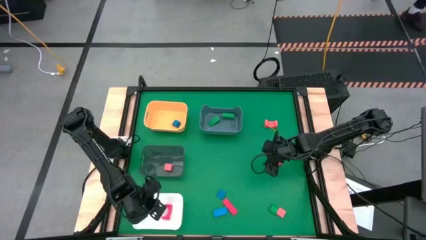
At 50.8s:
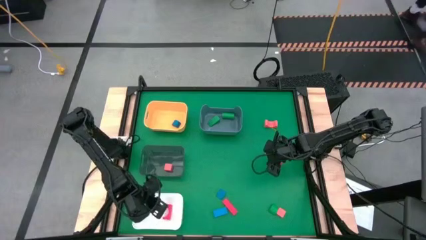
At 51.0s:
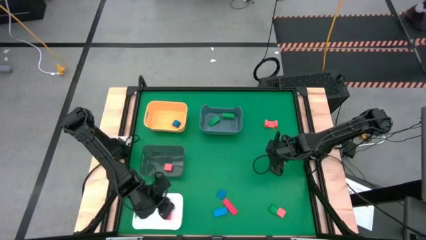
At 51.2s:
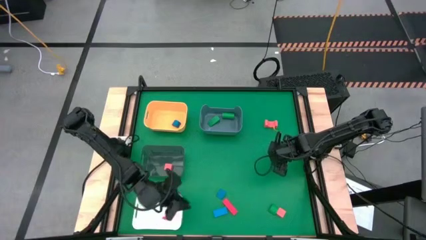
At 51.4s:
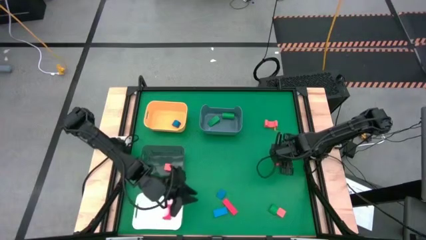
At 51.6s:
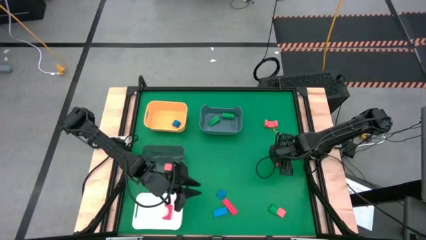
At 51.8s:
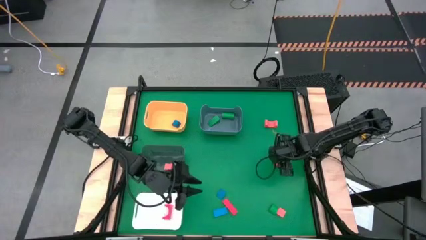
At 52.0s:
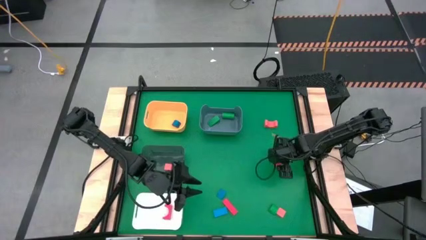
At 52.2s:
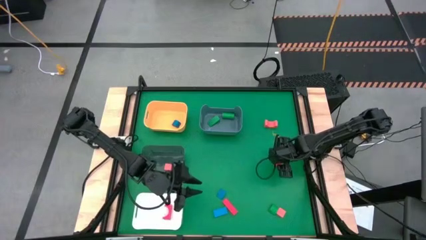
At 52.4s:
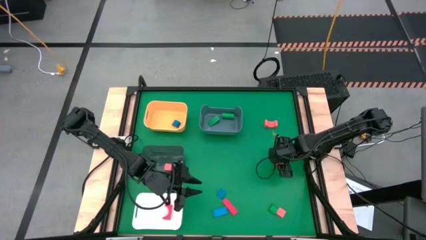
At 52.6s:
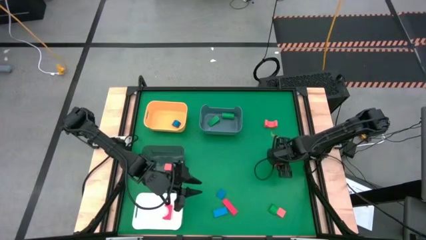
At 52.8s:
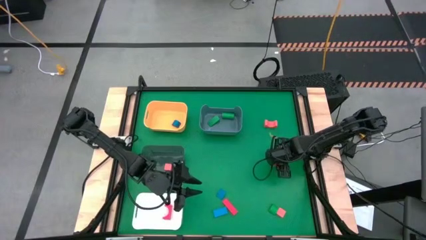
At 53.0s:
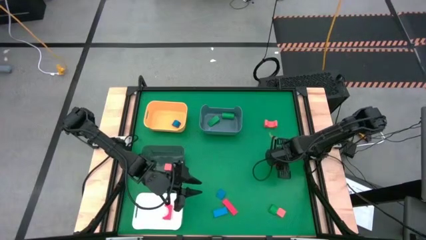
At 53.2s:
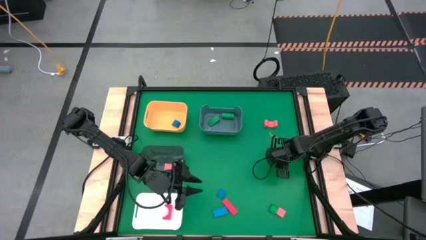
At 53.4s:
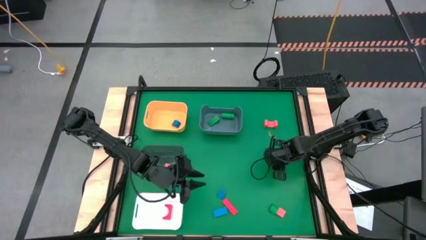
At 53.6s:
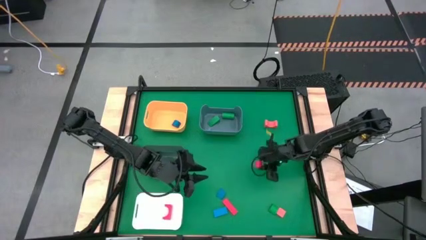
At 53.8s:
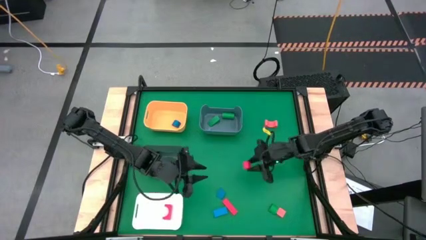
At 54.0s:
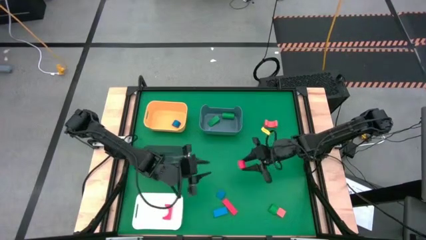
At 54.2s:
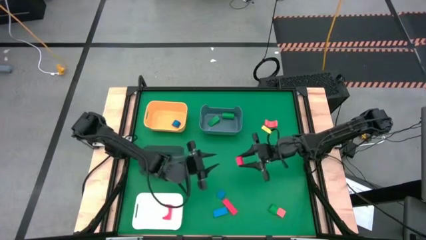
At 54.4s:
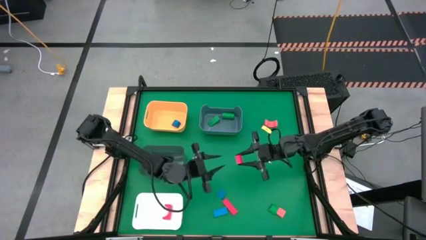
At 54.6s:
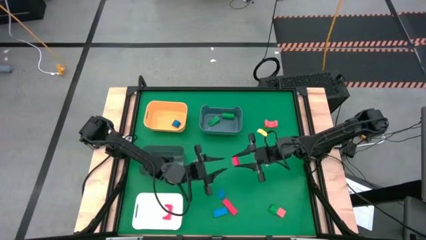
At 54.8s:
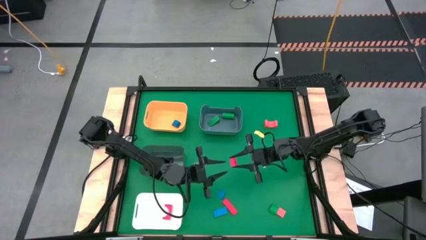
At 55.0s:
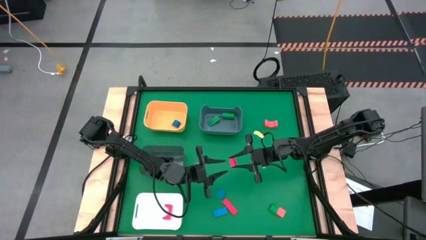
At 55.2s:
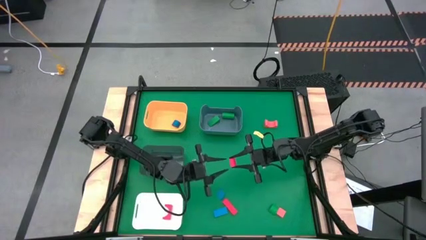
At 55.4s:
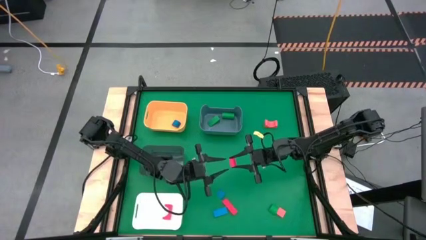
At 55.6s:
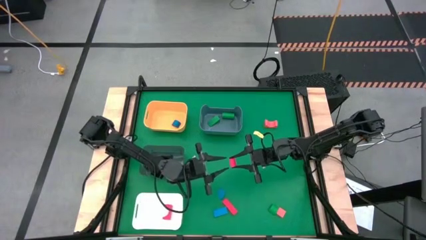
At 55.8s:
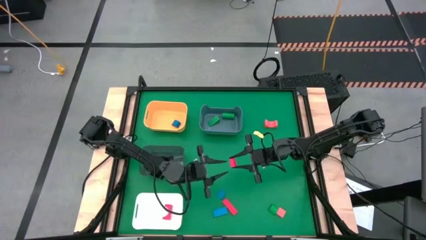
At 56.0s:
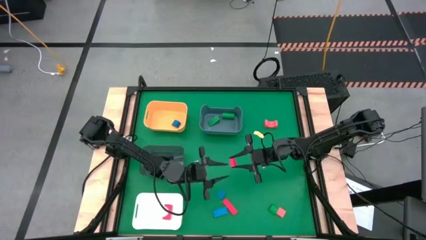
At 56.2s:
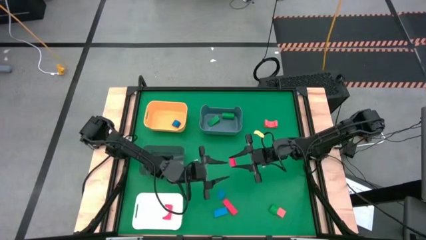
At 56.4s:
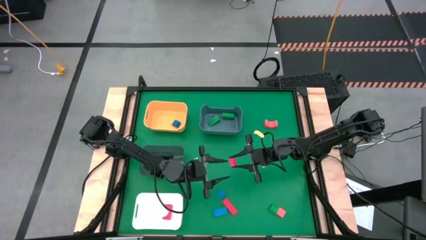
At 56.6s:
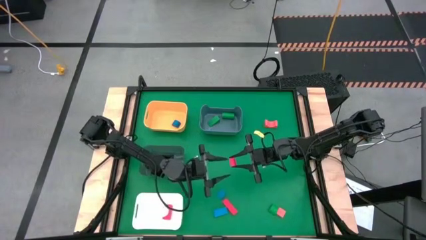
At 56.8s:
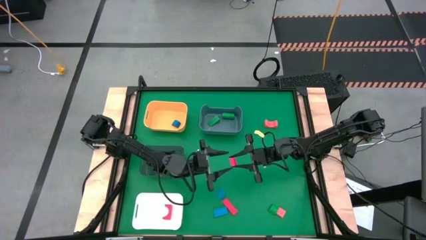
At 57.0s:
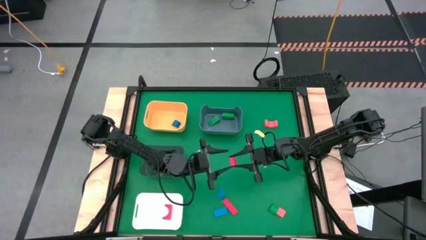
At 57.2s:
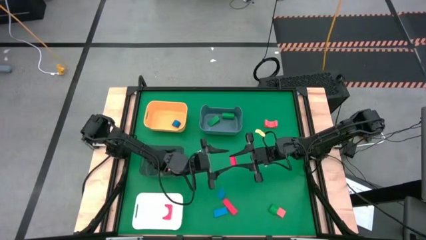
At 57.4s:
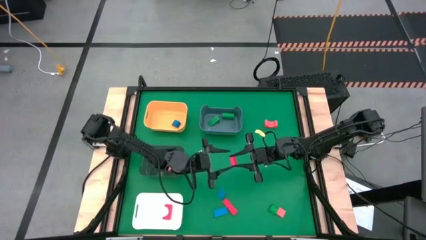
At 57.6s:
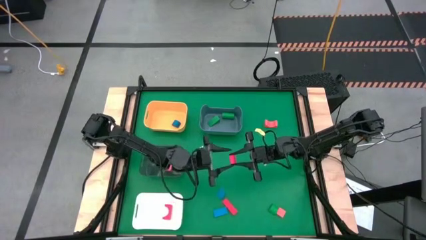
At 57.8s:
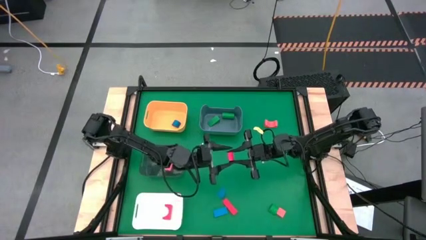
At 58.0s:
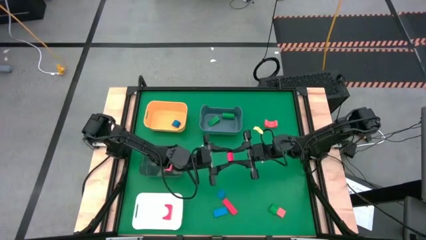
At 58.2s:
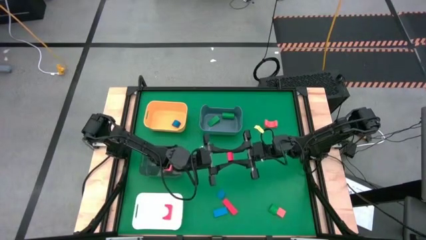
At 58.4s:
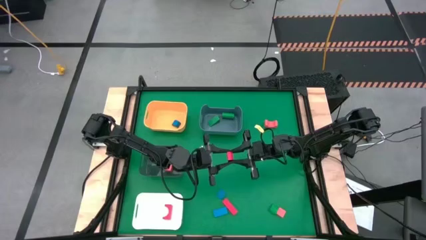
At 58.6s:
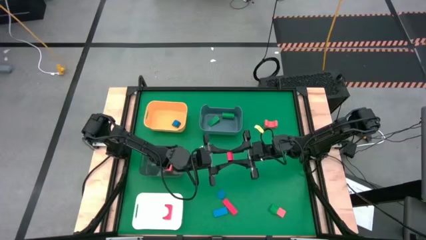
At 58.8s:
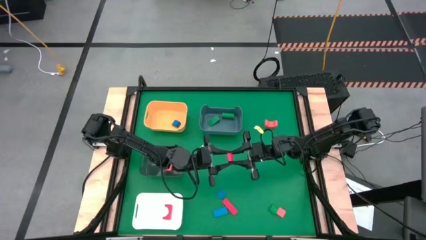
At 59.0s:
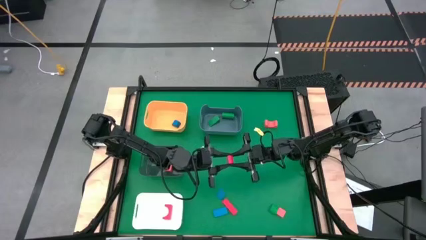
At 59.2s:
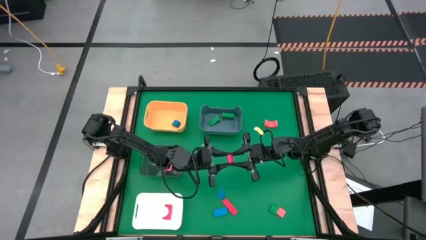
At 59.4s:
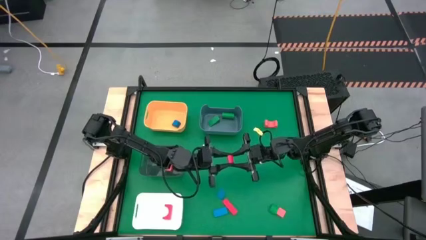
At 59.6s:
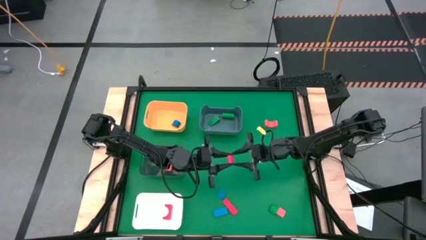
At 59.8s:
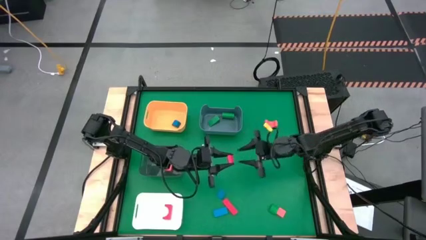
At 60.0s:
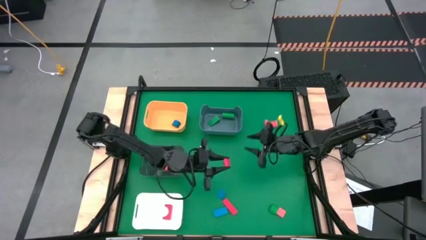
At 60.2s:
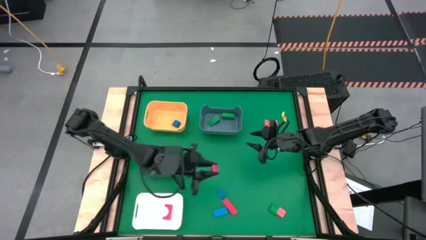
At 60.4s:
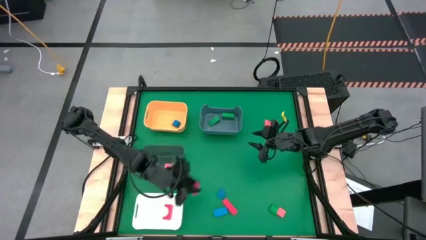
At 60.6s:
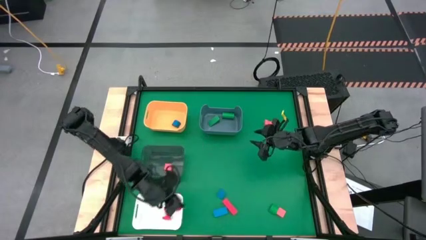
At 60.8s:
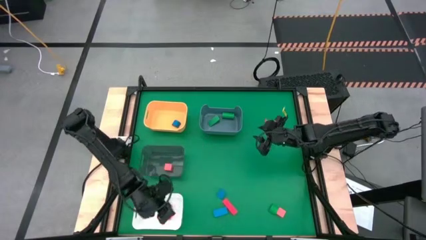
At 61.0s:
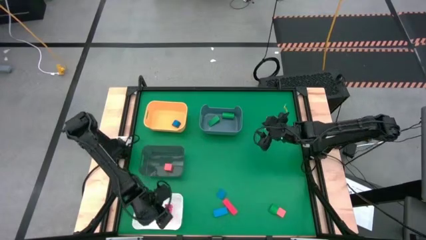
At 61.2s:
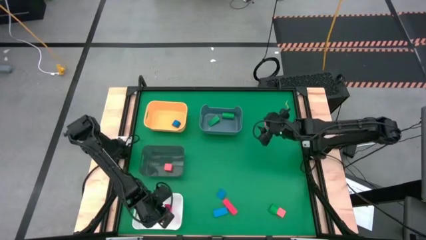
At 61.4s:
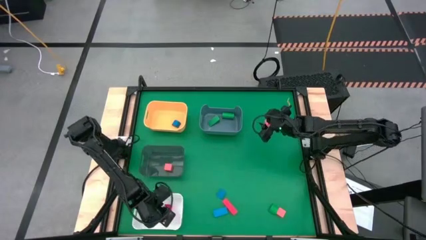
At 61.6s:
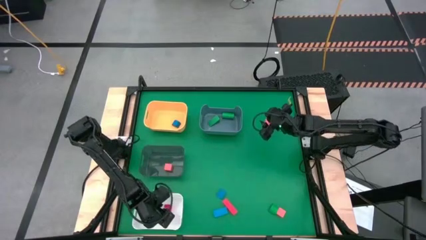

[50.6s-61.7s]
Task: Sort & place blocks by color
Put the red half circle block into the white bin

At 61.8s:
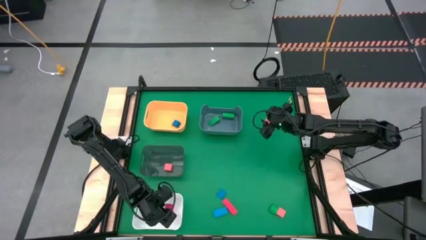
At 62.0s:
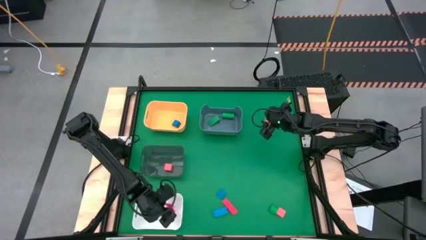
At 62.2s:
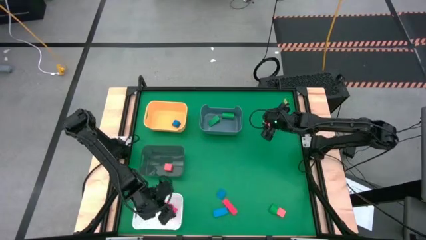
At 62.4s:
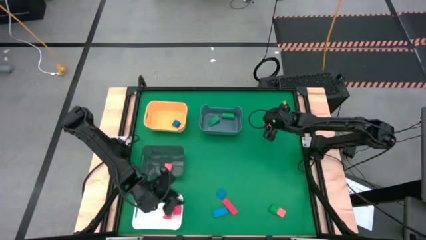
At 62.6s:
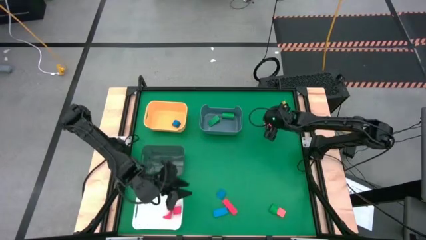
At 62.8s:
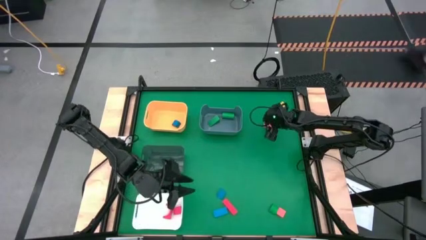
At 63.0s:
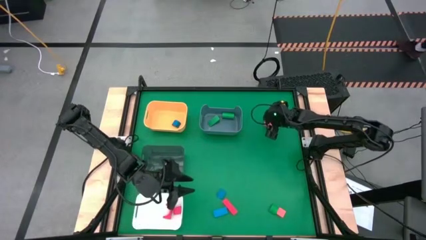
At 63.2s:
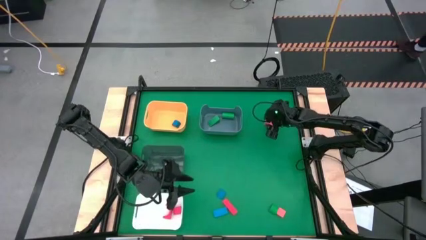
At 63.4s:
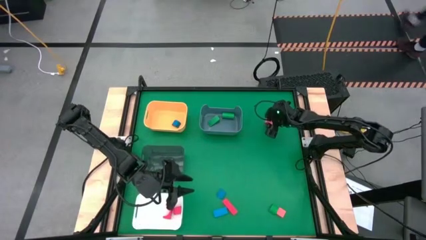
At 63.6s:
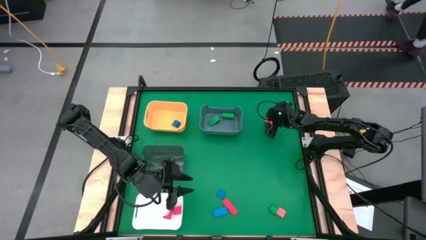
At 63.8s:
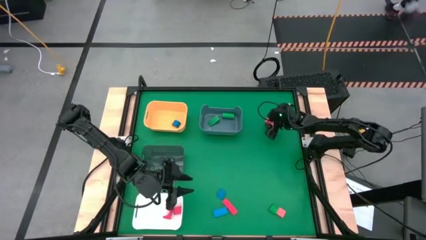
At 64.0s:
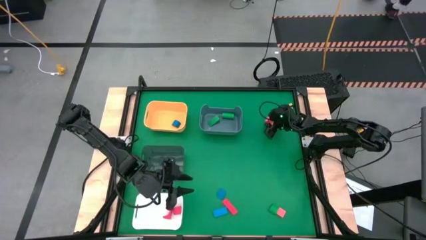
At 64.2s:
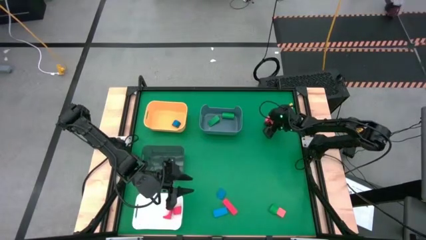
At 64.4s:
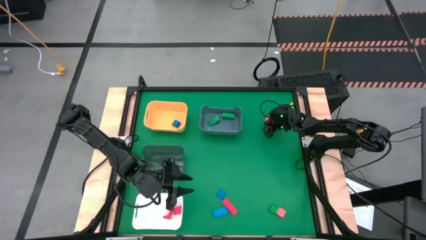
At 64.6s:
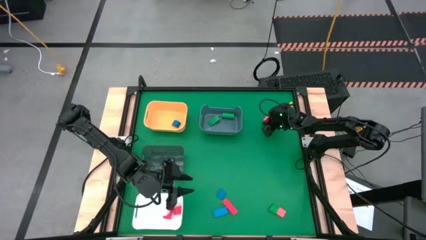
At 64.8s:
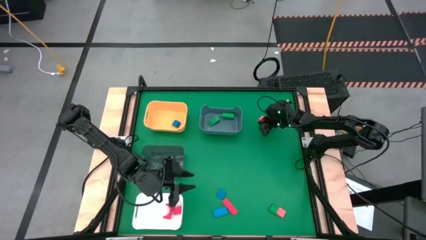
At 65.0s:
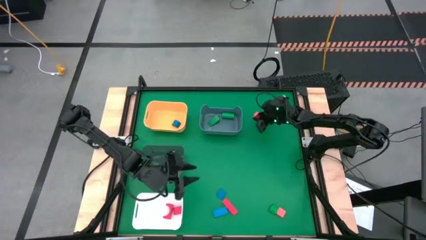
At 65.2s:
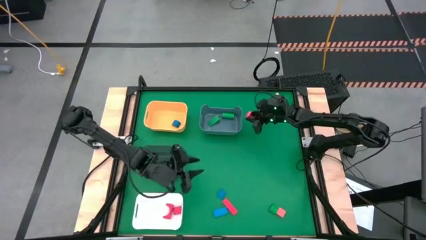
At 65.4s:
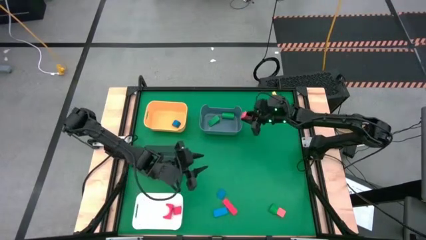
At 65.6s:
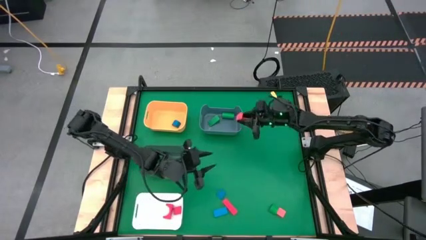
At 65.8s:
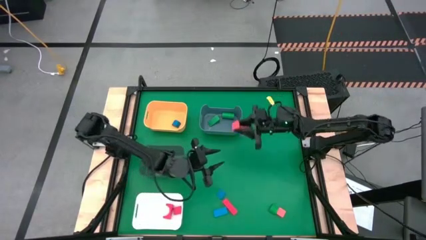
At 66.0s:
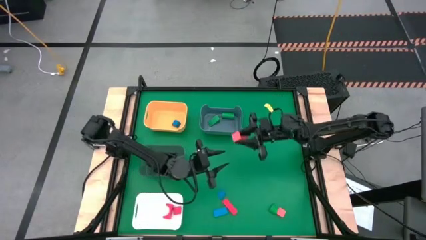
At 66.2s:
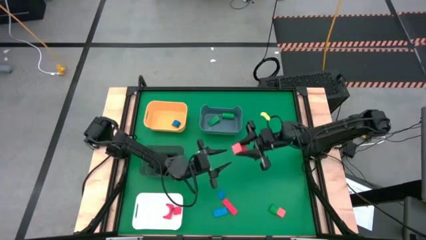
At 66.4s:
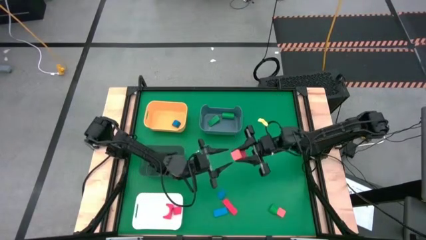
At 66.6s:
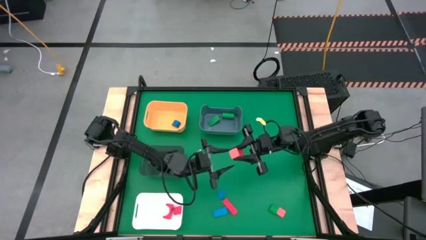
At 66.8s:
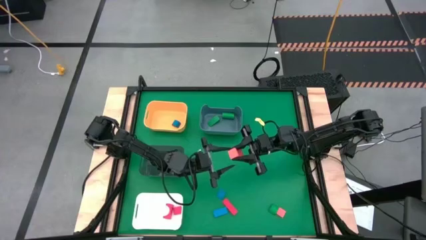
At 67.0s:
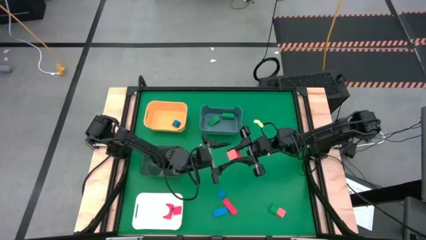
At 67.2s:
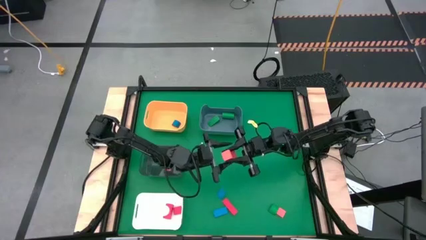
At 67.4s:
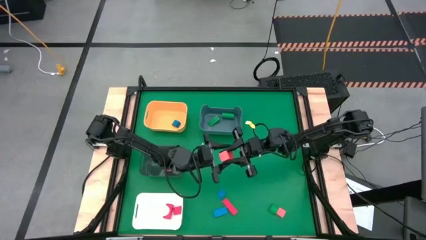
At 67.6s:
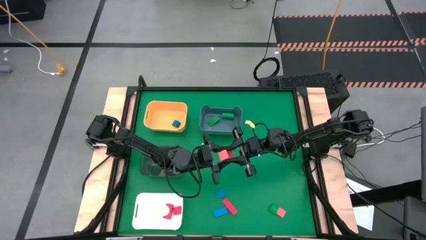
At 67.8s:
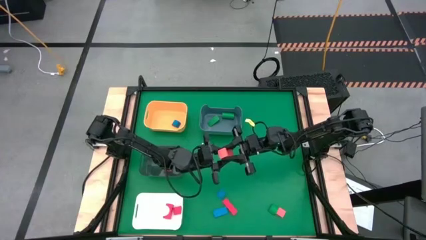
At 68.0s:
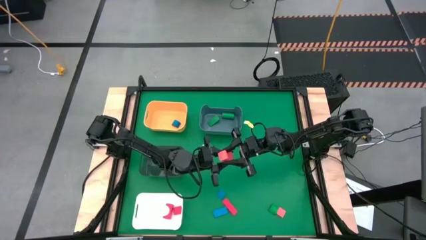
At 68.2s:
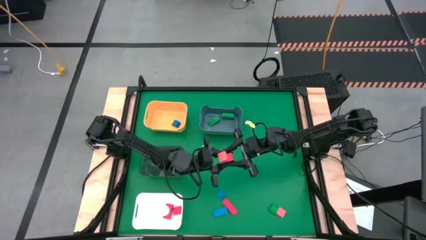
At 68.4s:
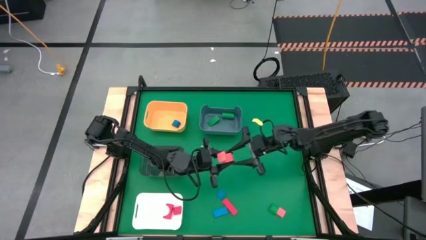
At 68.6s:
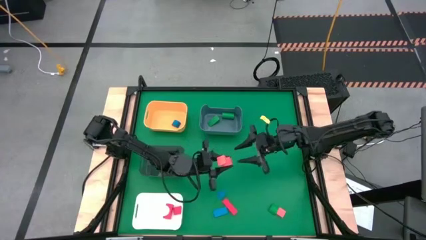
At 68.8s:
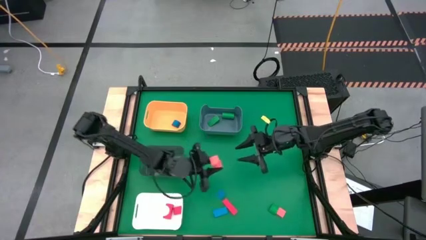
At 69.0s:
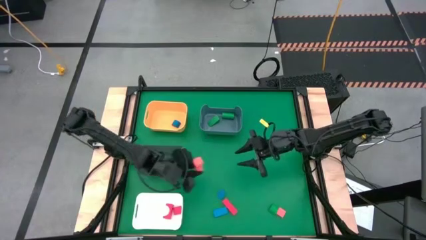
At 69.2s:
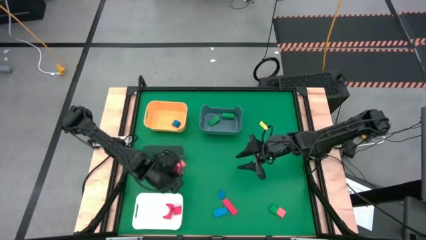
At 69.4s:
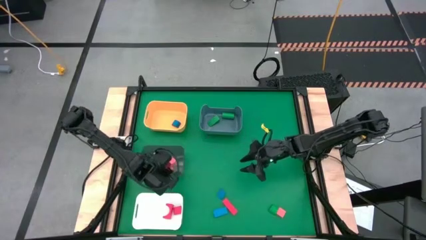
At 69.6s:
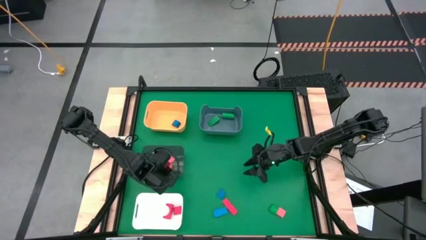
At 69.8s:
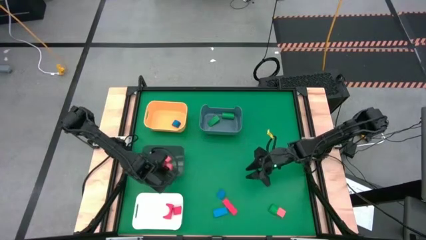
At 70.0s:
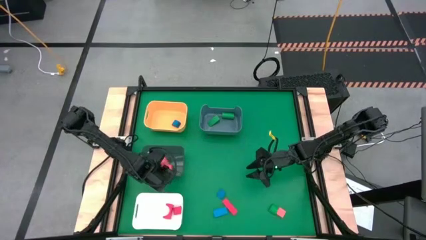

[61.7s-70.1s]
Put the orange arch block into the black bin
